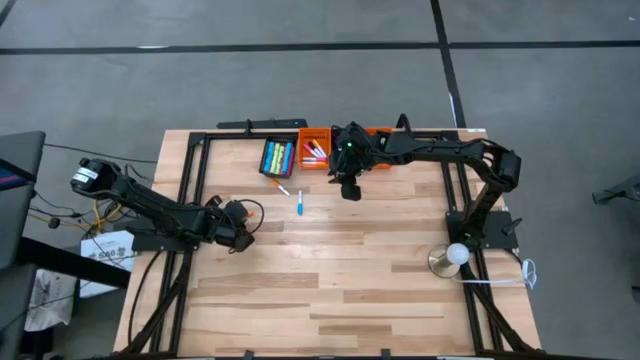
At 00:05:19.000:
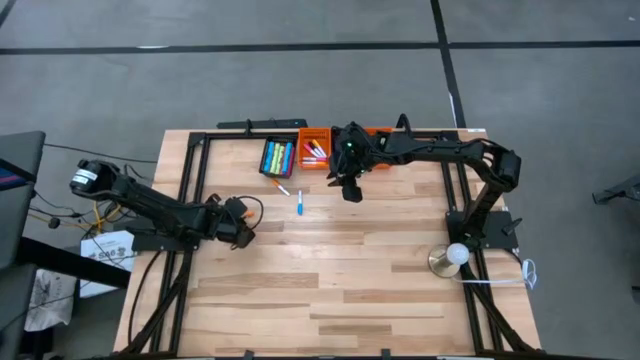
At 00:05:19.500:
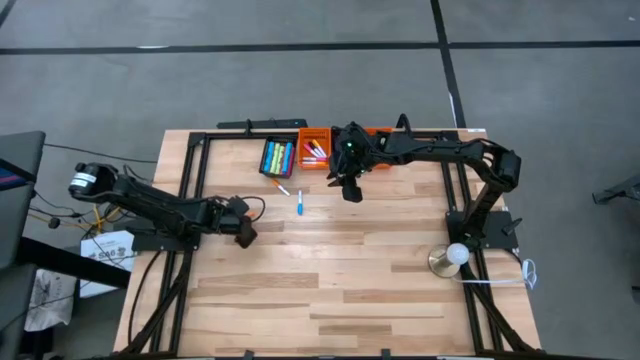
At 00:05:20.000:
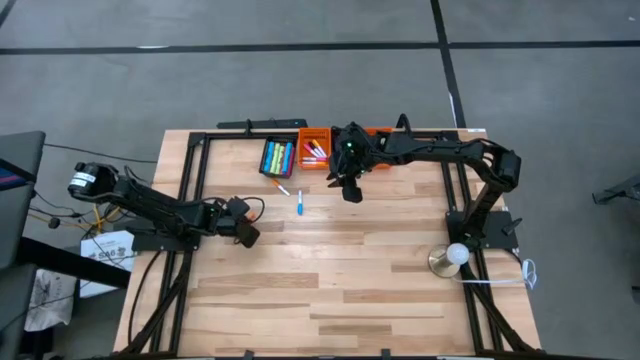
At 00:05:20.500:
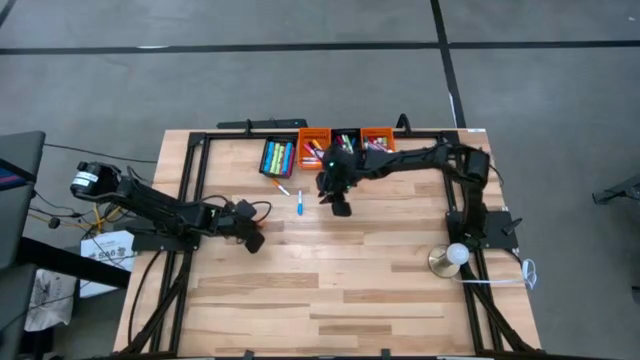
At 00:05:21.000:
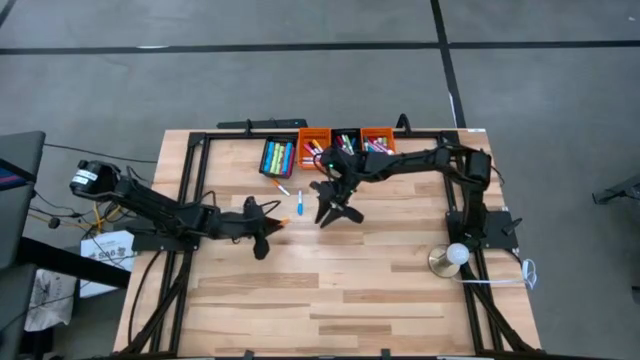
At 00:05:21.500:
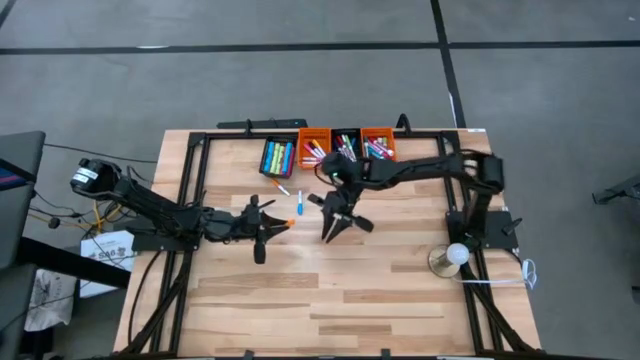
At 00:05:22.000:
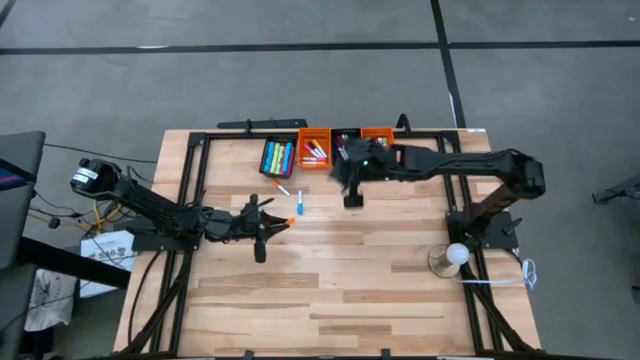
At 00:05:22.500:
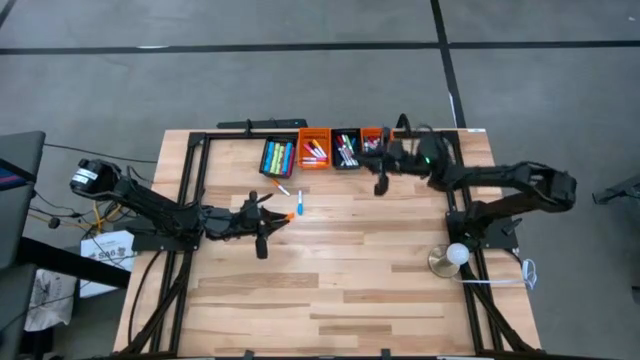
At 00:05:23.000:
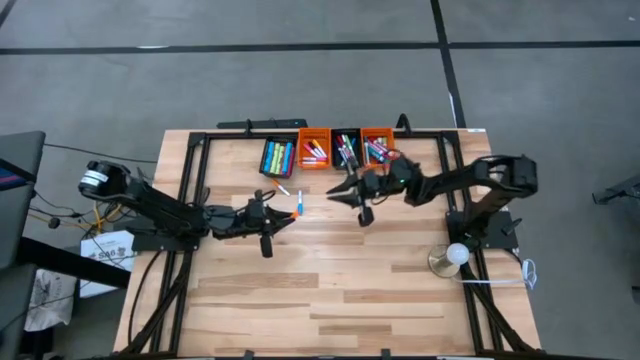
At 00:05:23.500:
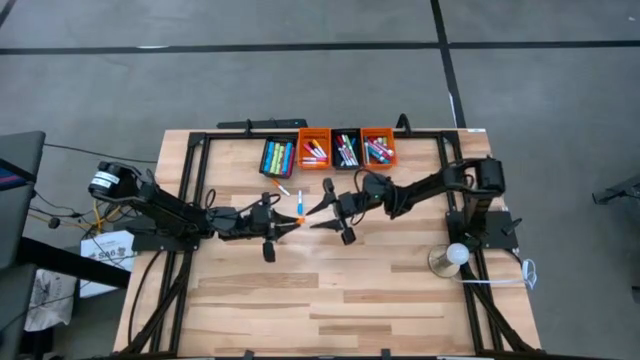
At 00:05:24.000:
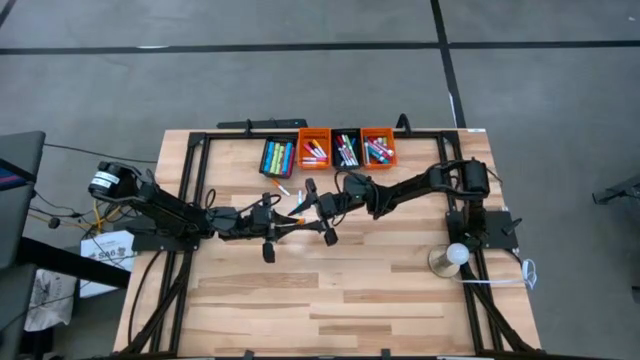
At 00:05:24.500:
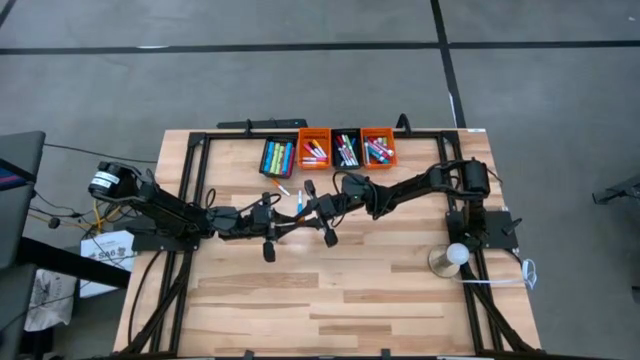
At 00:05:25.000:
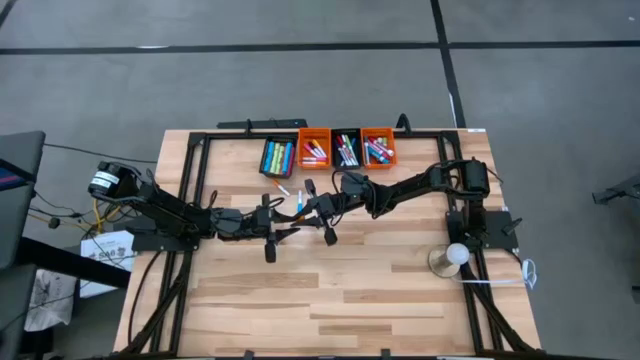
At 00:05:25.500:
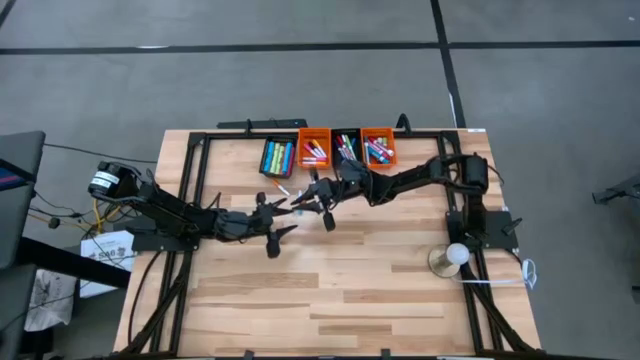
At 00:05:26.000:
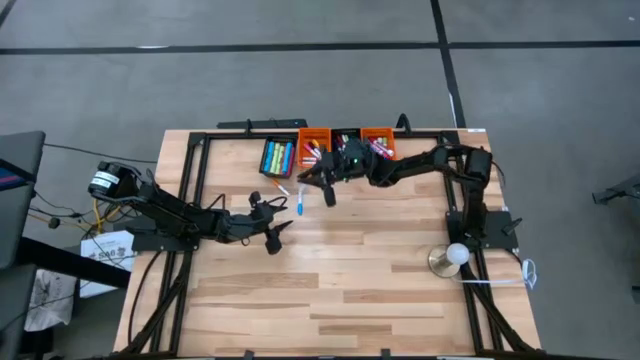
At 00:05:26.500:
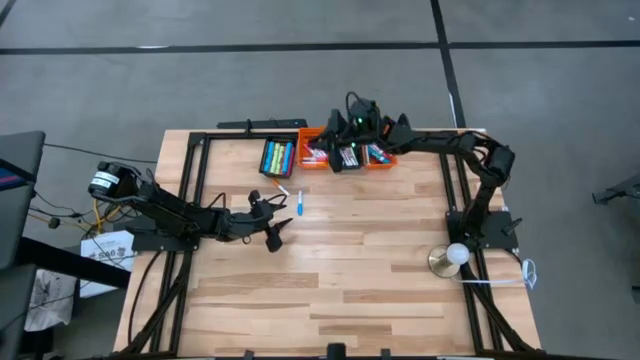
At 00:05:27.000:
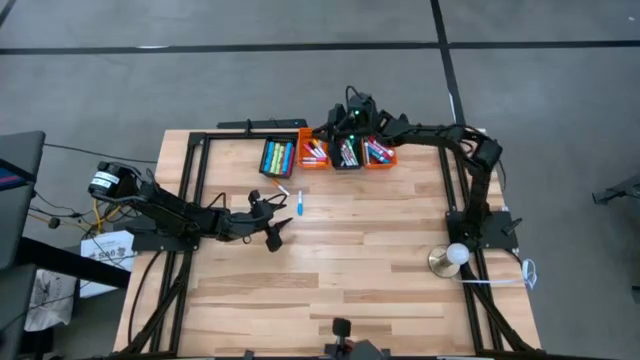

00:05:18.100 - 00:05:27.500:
Task: Pick & Place Markers
Put the small orange highlighter pen into the left orange basket

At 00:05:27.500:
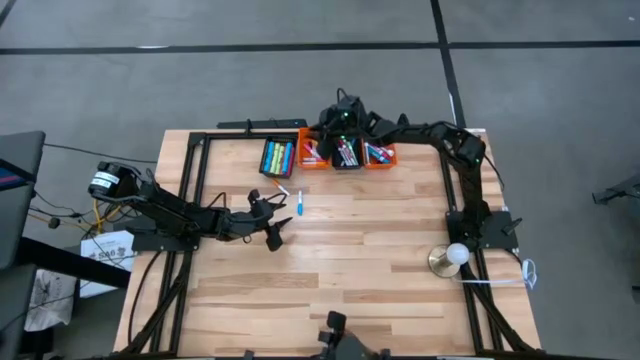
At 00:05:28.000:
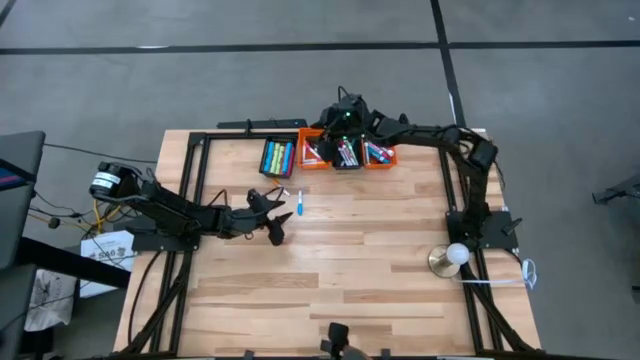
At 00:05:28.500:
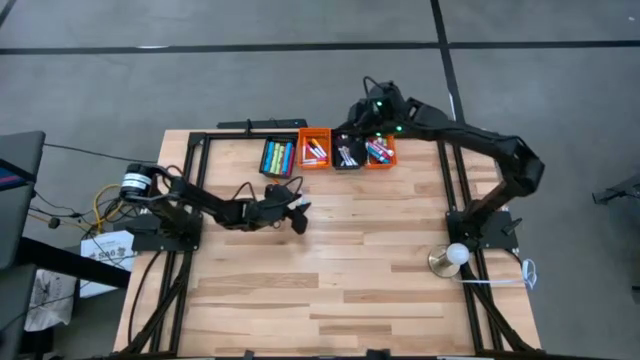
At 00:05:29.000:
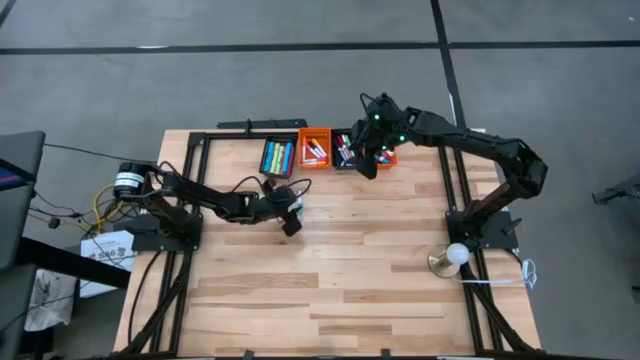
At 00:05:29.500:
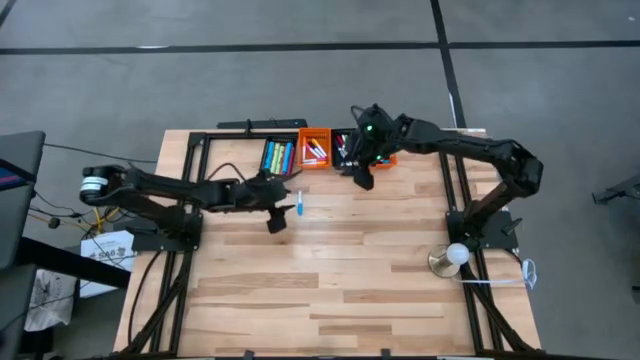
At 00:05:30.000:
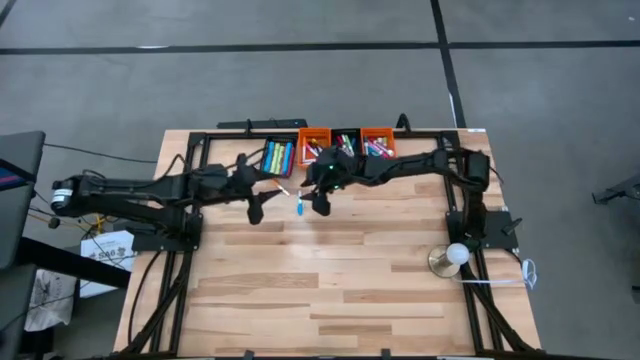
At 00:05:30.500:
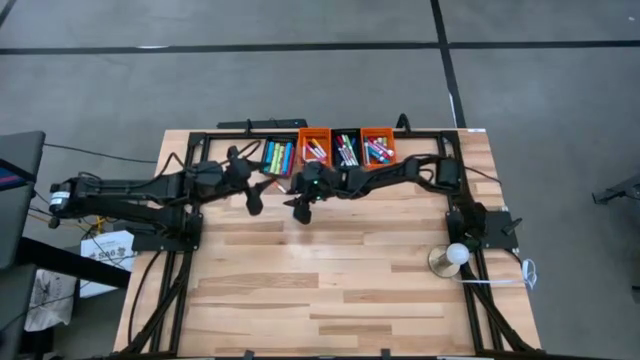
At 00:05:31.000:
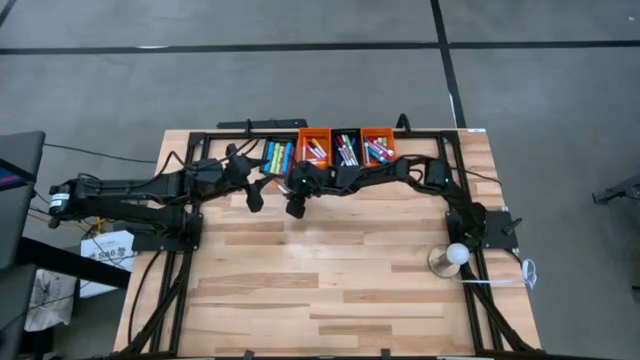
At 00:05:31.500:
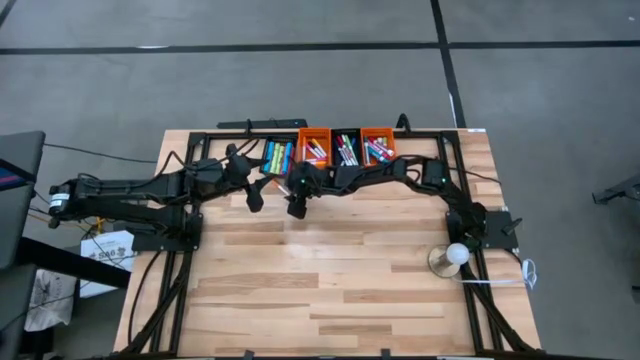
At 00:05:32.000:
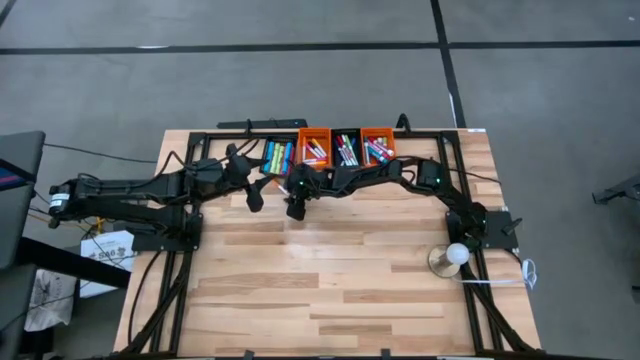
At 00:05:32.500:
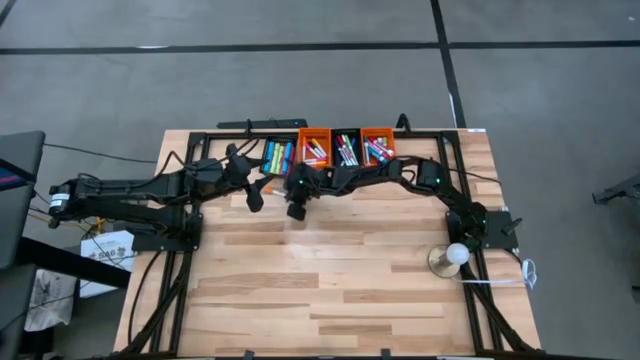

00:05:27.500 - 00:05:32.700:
Put the small orange highlighter pen into the left orange basket

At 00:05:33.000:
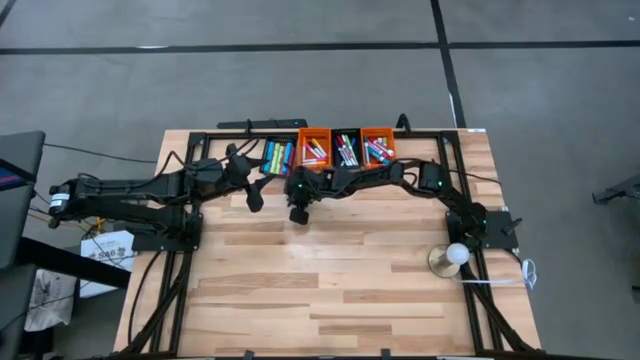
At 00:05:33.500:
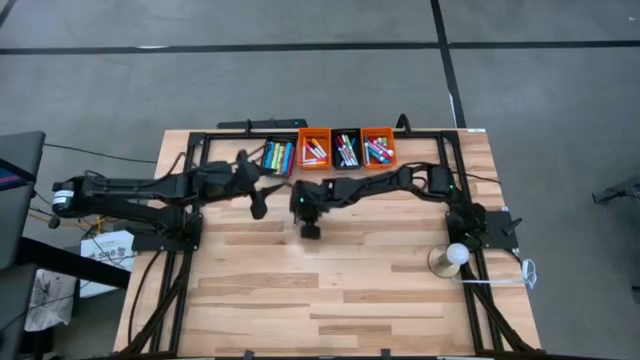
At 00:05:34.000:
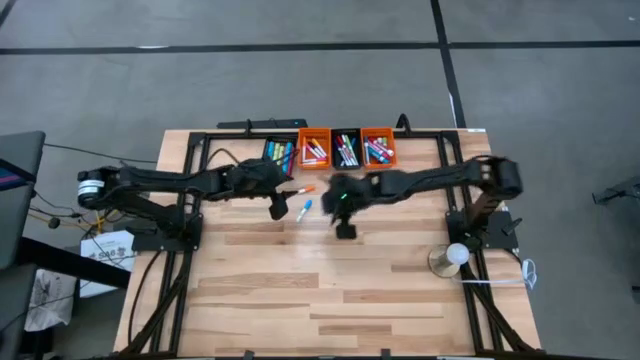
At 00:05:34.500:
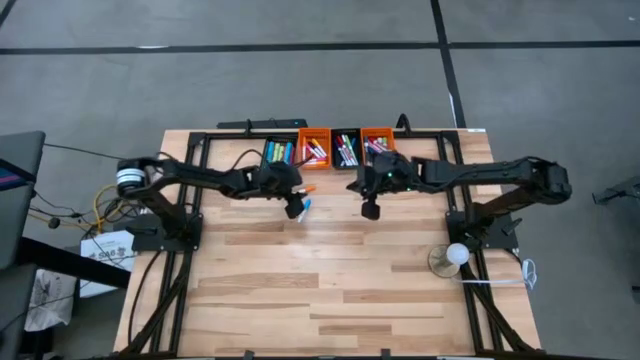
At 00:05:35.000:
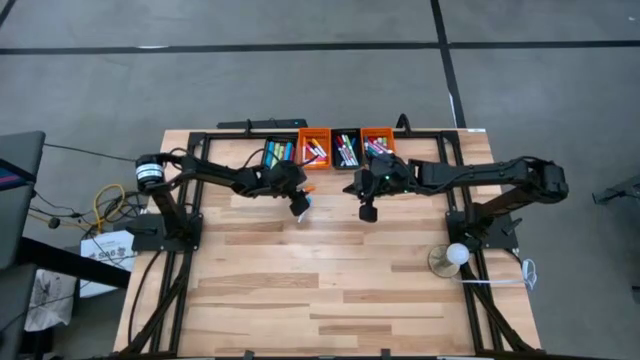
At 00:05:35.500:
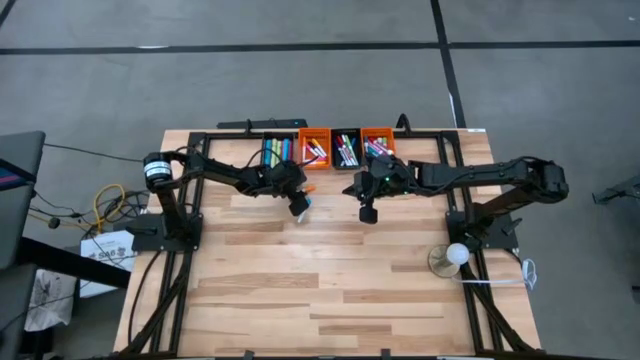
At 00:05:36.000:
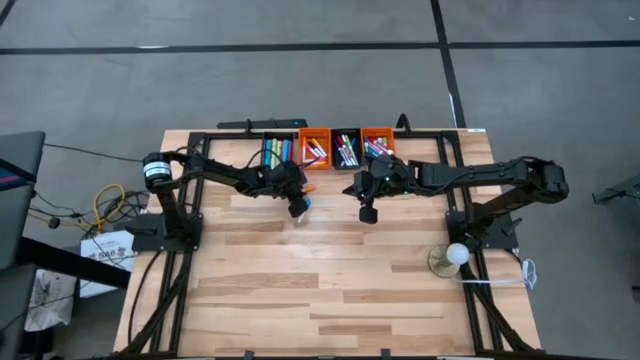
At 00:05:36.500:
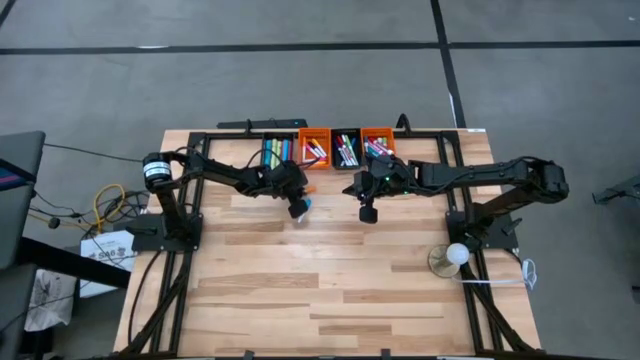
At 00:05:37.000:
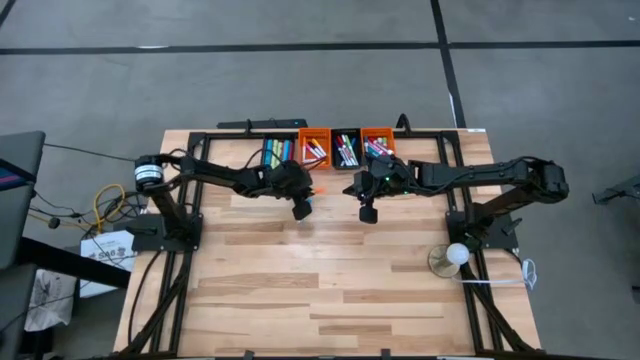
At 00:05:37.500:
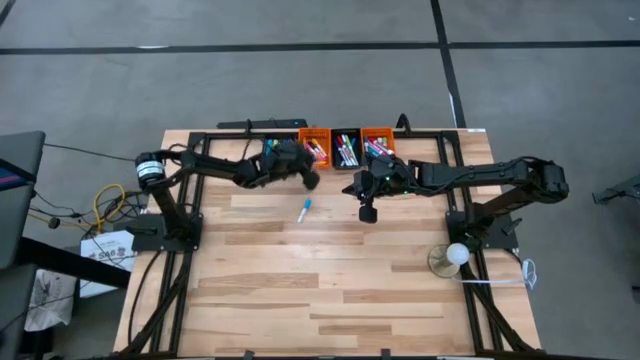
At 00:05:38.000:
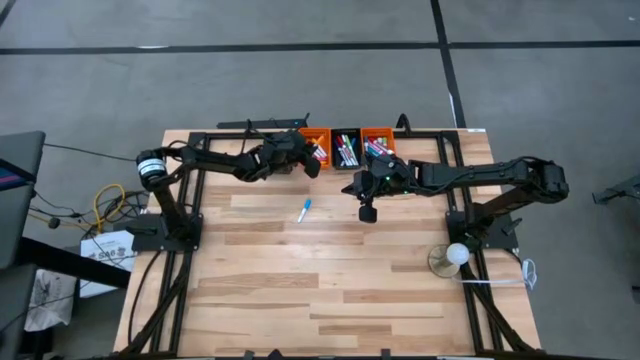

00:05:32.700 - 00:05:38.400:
Put the small orange highlighter pen into the left orange basket
